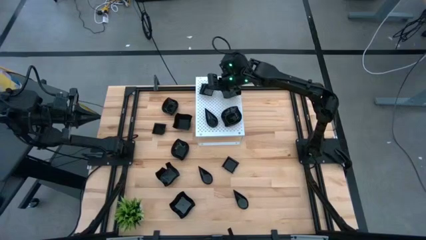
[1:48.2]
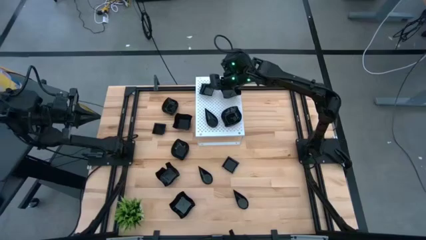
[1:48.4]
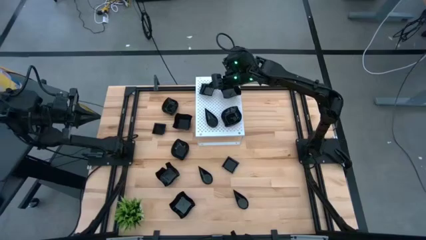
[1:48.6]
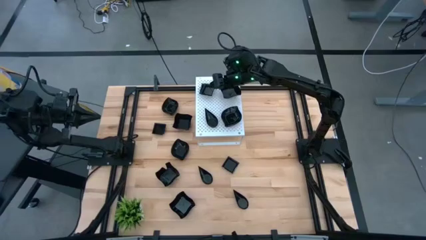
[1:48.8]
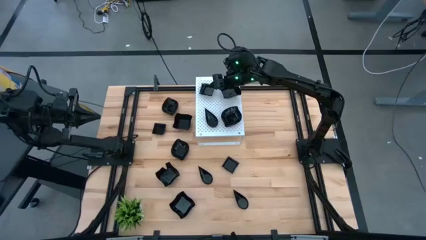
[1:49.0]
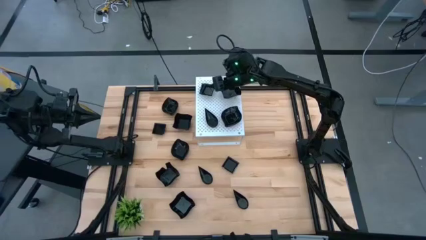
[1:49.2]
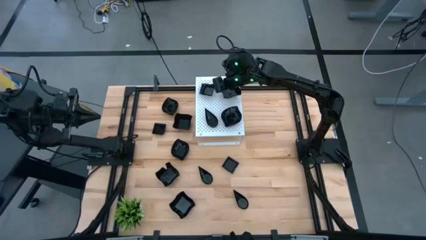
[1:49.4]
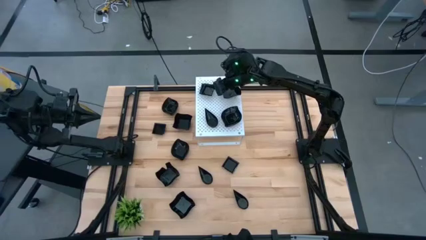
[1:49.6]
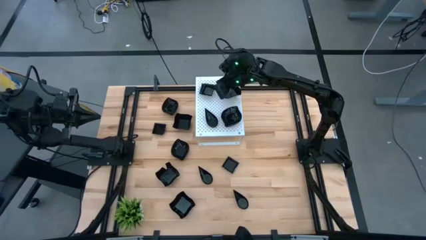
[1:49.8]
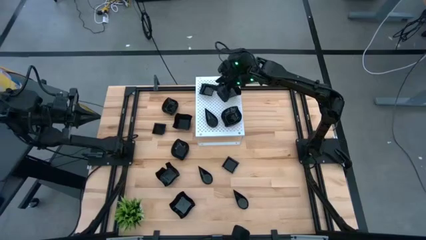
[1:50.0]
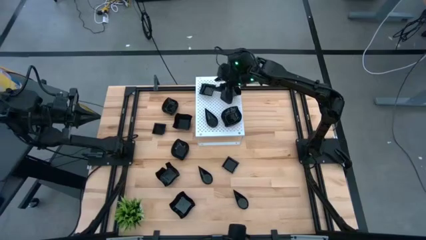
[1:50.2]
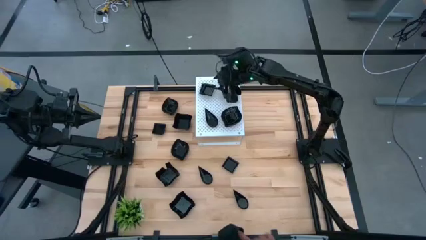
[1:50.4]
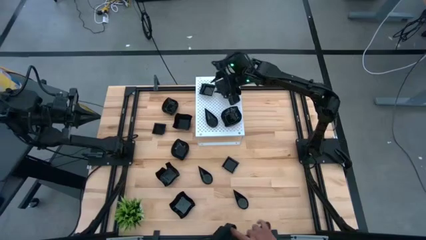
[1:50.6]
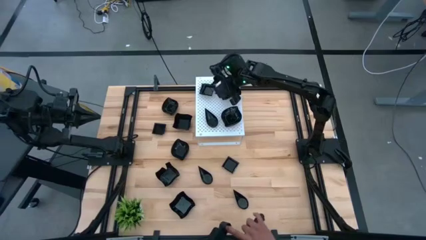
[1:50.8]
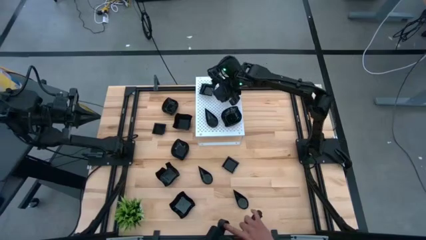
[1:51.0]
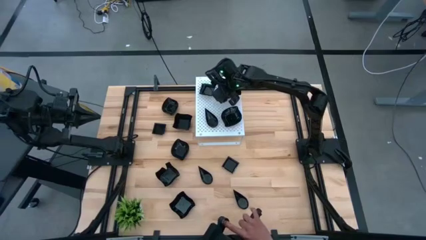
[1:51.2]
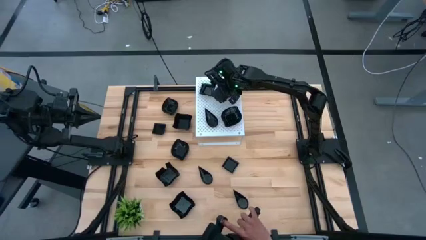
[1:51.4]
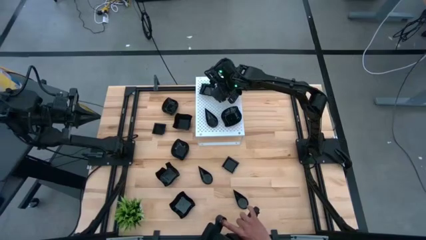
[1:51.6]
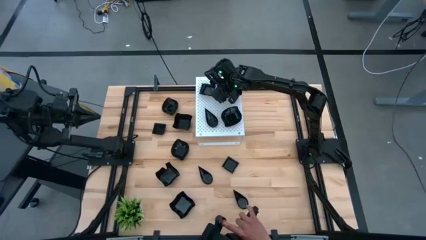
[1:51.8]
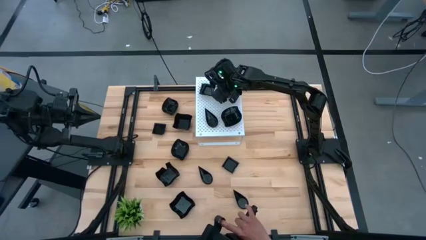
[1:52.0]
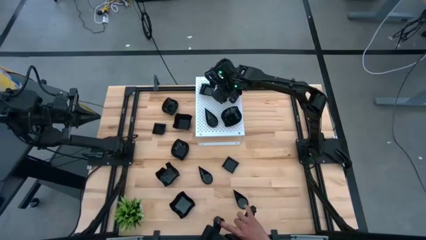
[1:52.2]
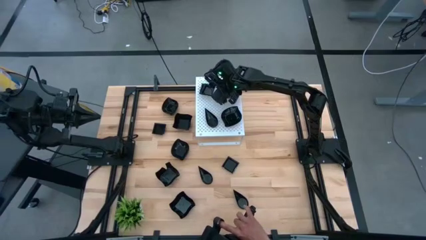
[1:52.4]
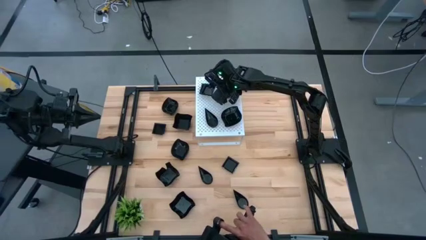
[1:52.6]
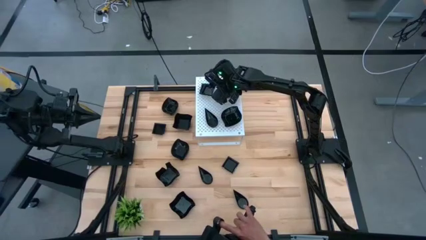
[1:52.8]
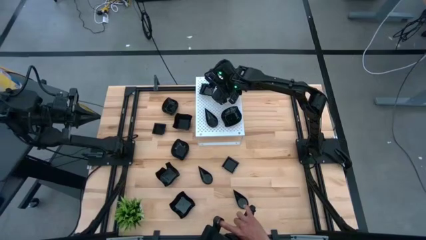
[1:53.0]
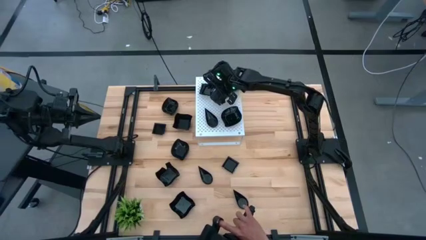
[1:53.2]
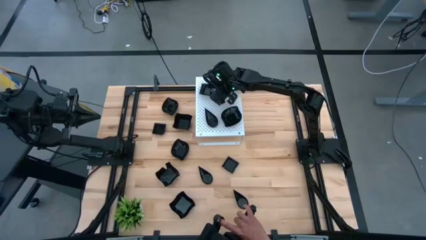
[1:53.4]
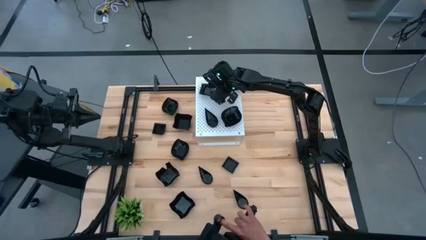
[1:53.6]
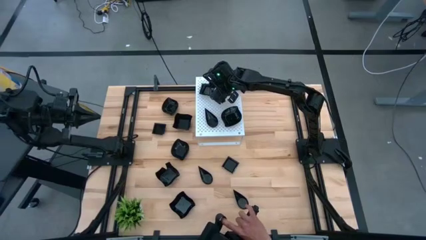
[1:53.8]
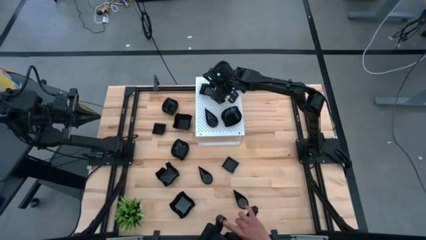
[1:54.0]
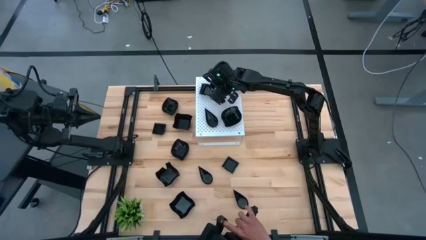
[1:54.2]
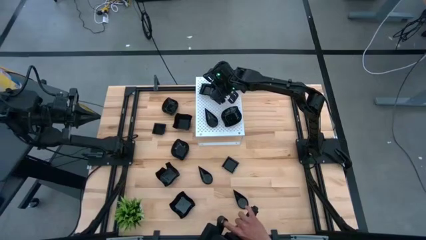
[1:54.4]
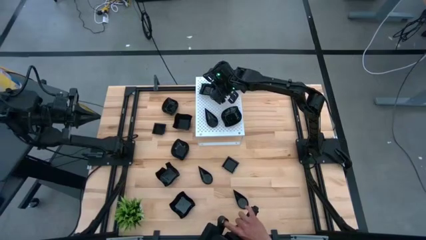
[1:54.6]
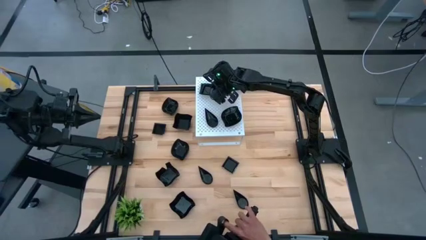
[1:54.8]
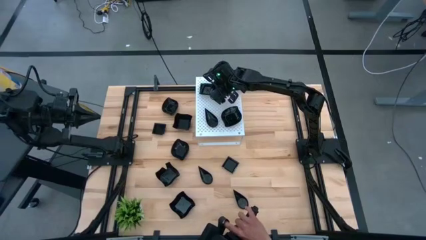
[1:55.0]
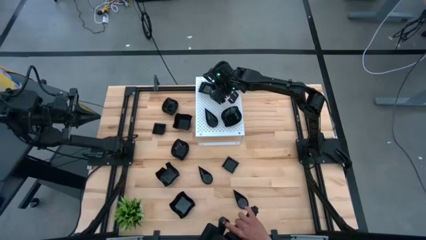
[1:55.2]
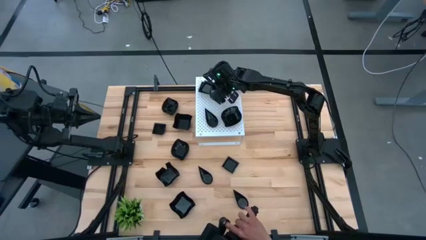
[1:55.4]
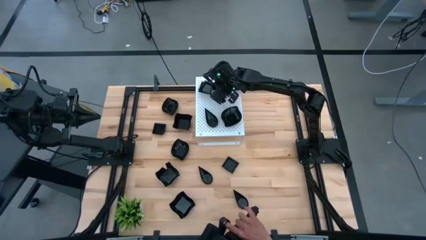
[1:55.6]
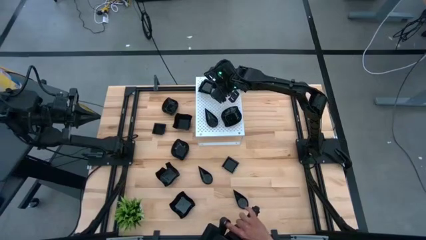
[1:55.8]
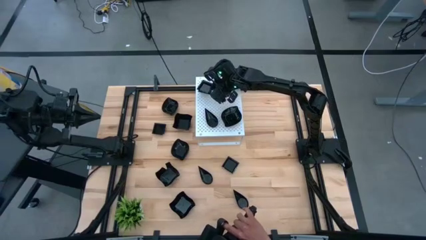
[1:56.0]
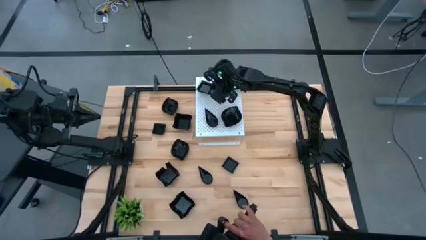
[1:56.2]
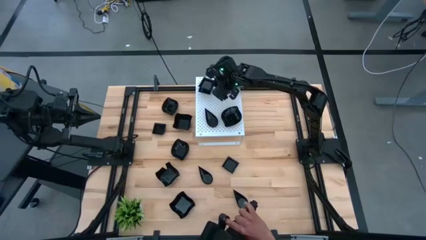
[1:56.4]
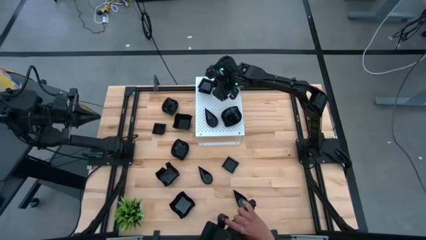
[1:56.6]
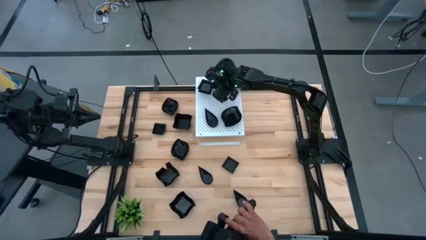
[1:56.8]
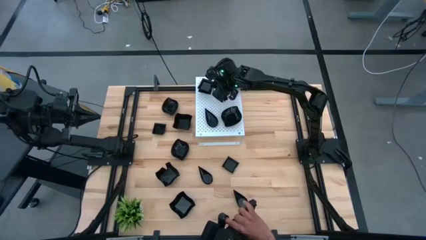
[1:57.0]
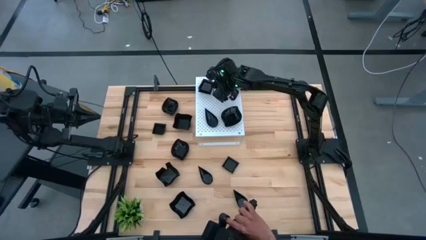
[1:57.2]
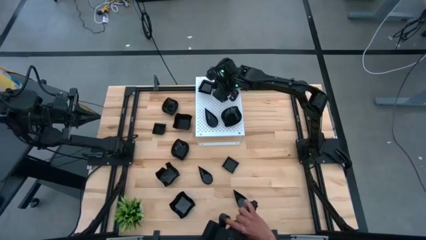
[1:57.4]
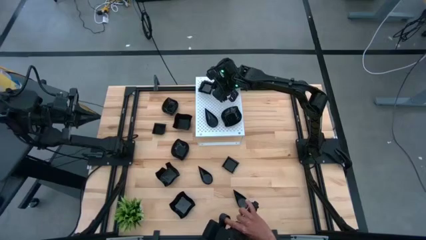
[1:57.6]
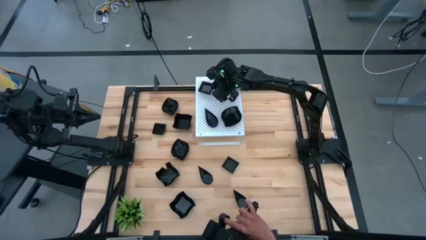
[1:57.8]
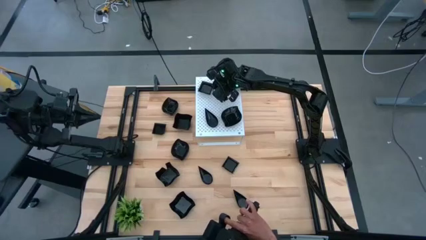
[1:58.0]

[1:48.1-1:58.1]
Task: Pick & Place Mini shaped plates
Stack the square plate on top of the square plate on the shelf

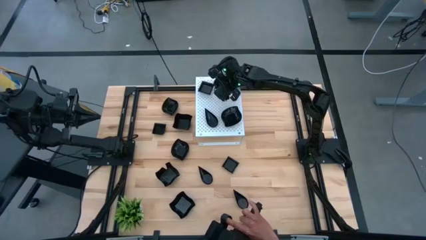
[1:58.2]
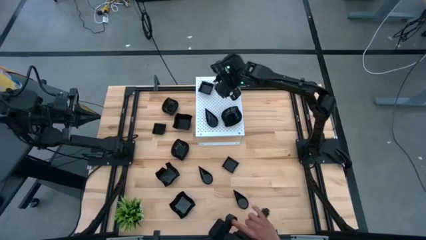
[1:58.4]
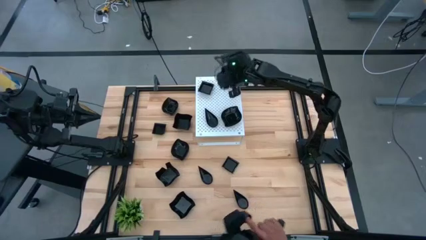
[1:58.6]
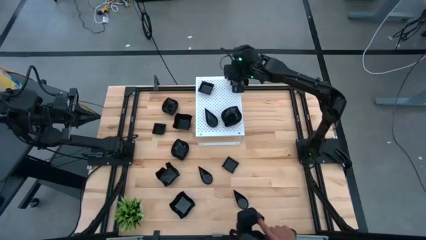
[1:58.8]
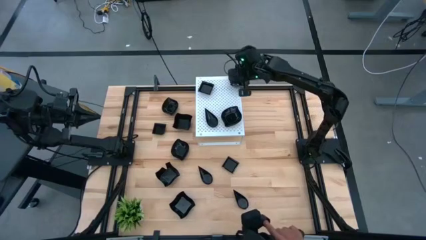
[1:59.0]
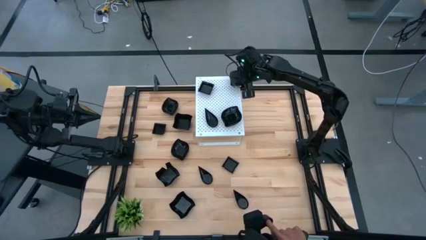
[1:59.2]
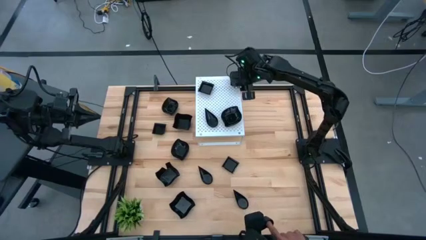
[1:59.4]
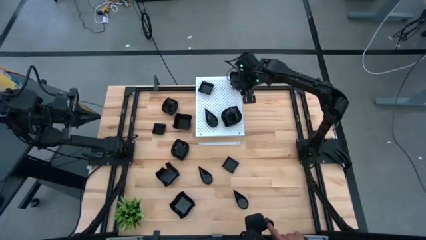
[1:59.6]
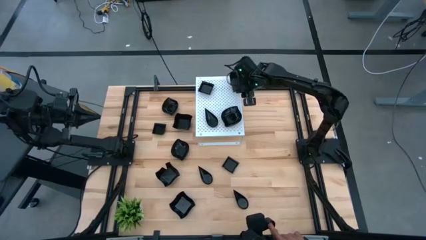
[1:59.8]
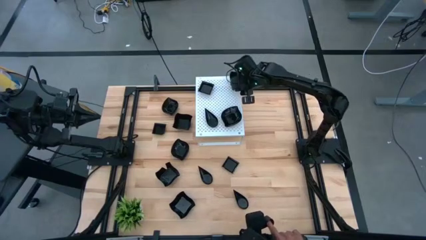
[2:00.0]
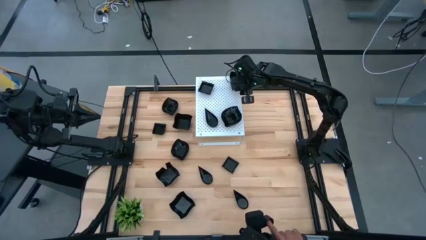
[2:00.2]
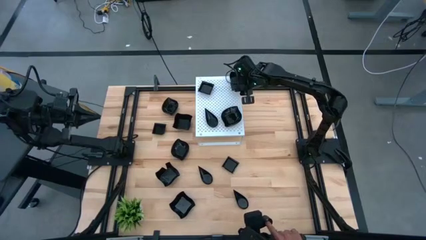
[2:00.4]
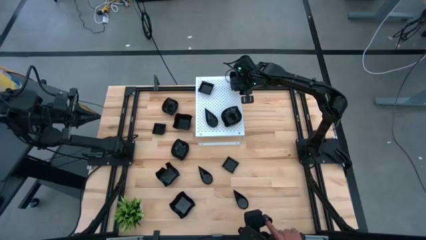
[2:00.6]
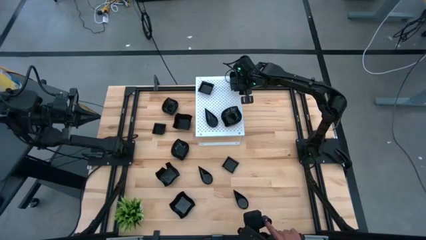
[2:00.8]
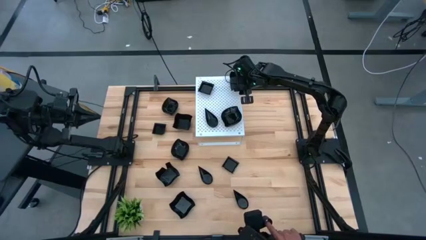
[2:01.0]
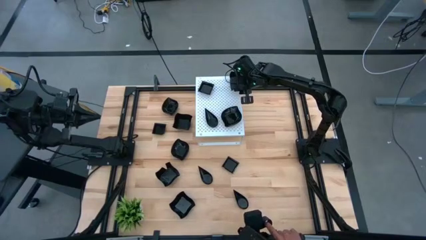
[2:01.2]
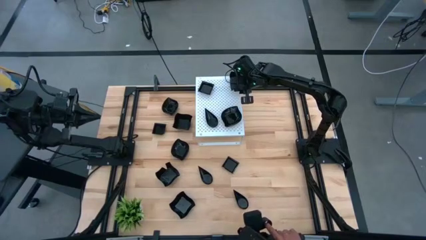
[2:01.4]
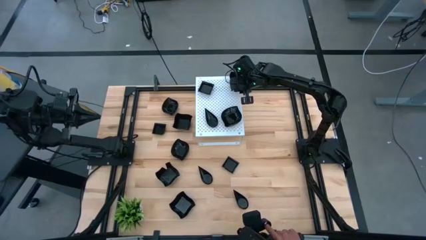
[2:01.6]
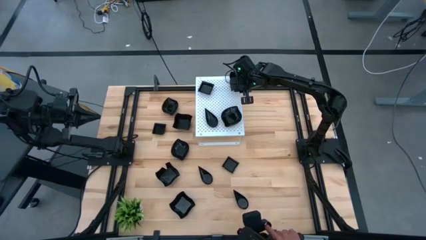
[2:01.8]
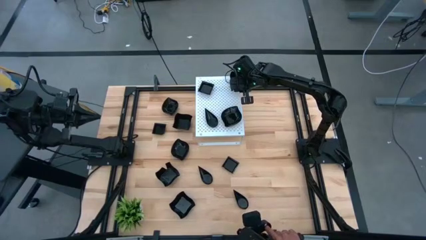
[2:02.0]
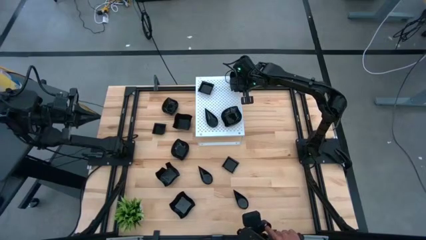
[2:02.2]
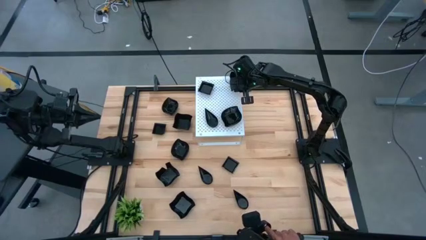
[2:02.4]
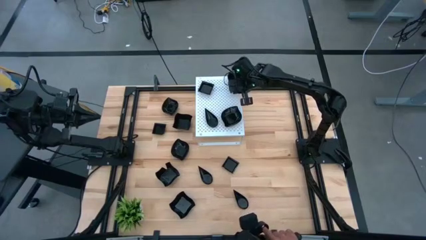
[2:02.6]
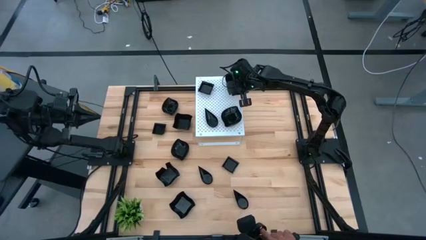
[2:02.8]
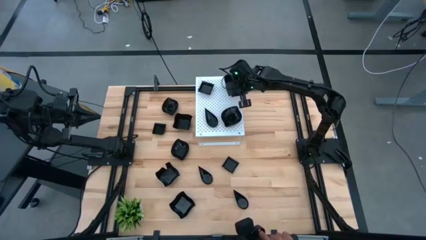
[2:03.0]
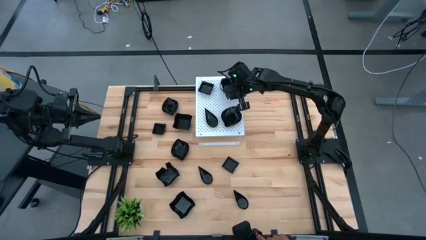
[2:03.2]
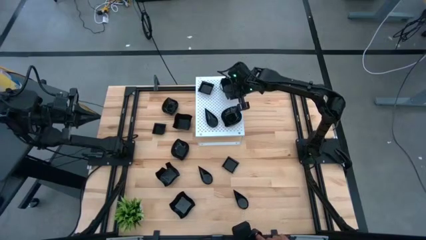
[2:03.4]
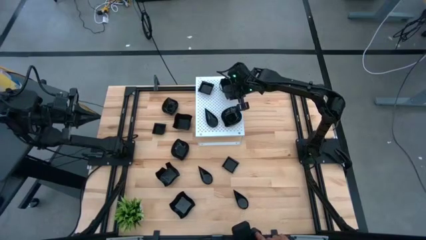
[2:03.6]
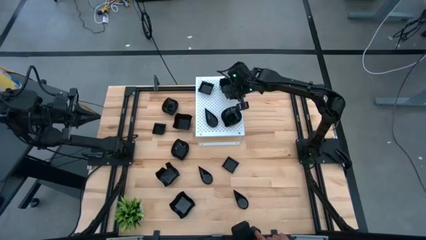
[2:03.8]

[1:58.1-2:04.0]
Adjust the distorted square plate on the shelf
